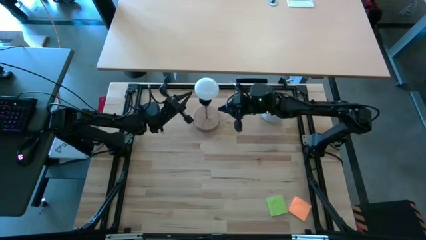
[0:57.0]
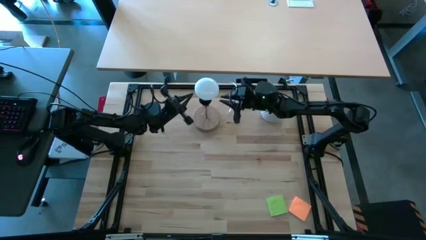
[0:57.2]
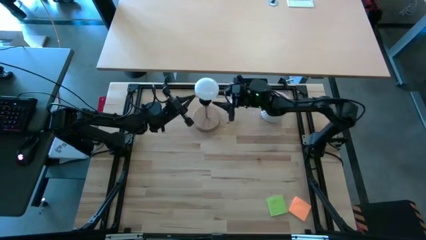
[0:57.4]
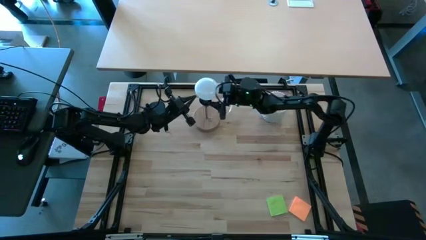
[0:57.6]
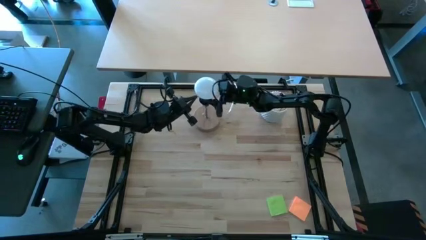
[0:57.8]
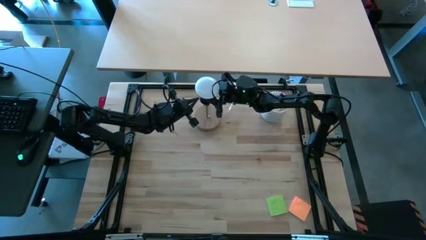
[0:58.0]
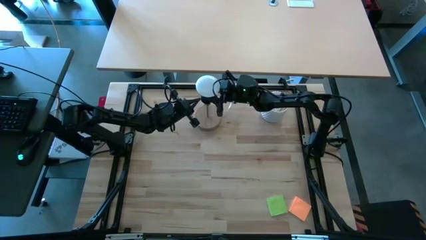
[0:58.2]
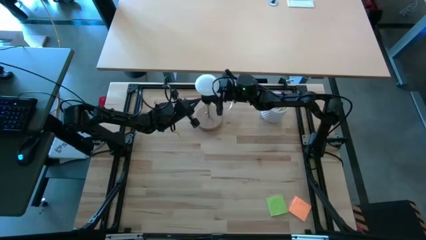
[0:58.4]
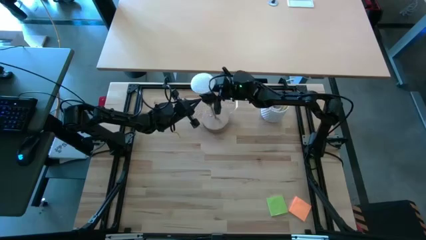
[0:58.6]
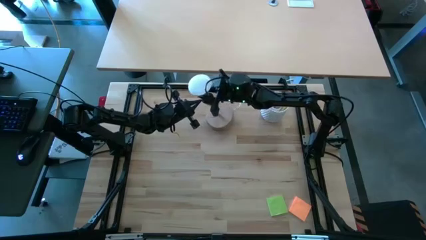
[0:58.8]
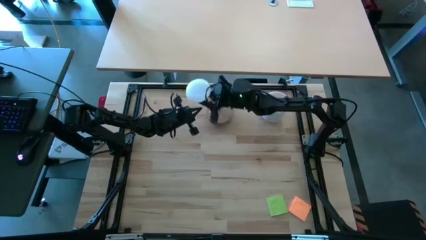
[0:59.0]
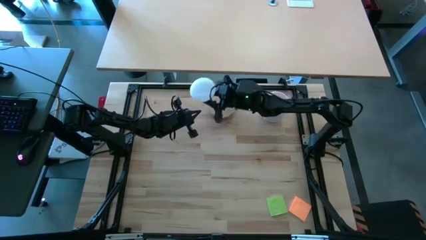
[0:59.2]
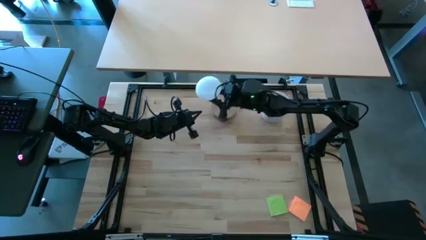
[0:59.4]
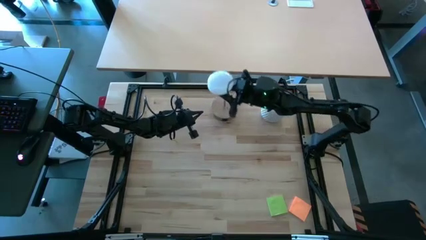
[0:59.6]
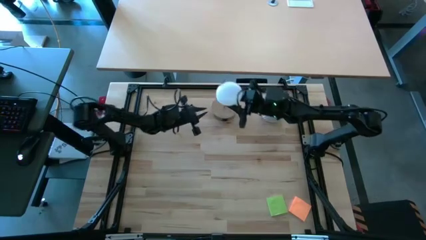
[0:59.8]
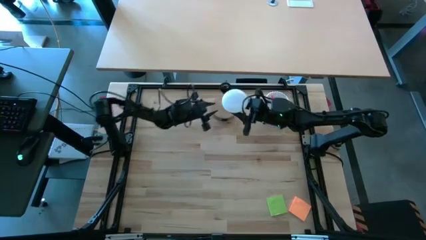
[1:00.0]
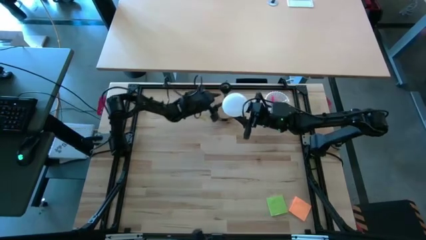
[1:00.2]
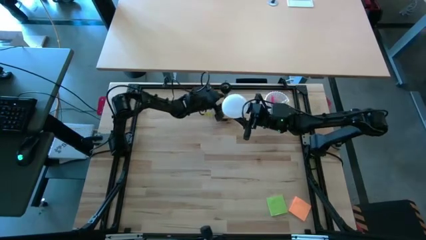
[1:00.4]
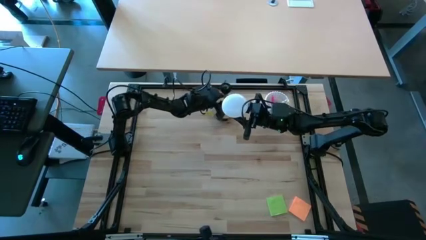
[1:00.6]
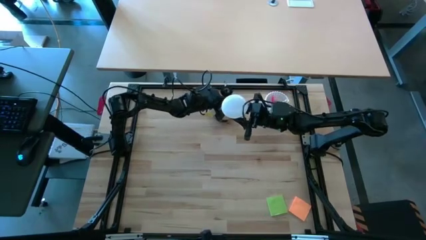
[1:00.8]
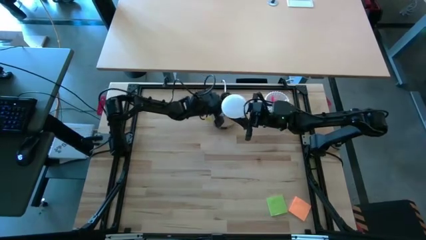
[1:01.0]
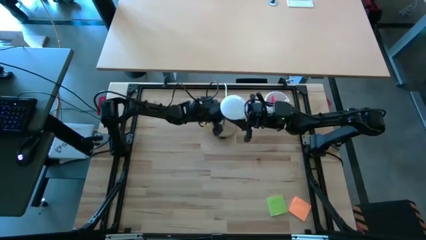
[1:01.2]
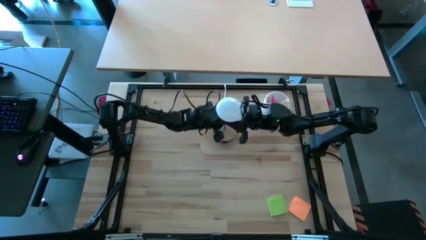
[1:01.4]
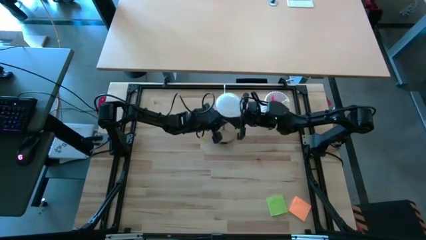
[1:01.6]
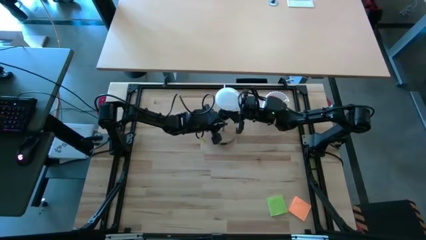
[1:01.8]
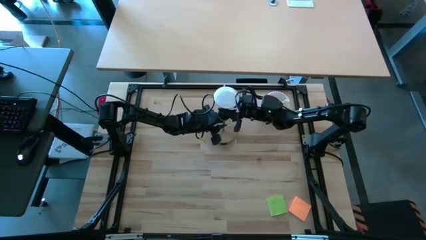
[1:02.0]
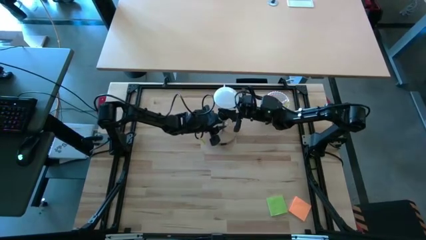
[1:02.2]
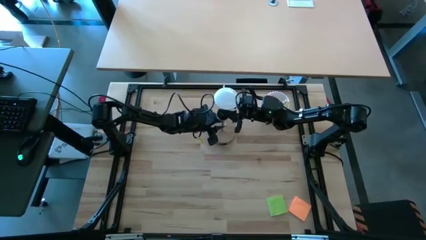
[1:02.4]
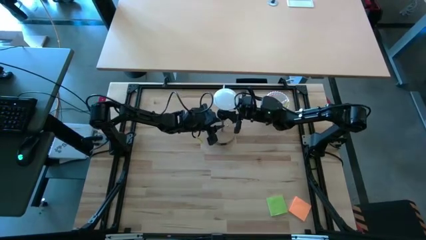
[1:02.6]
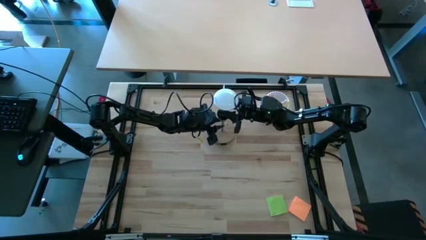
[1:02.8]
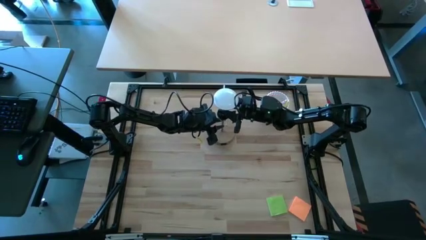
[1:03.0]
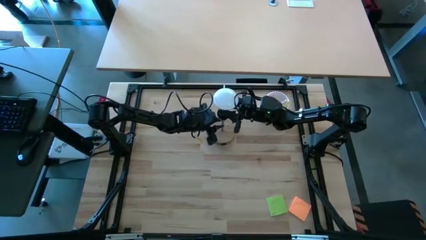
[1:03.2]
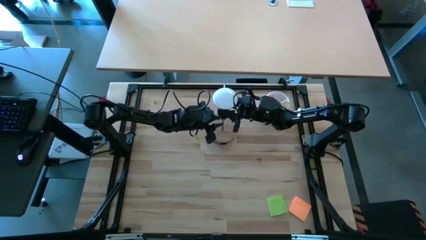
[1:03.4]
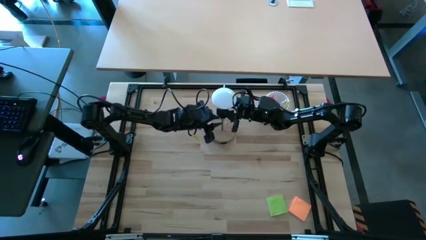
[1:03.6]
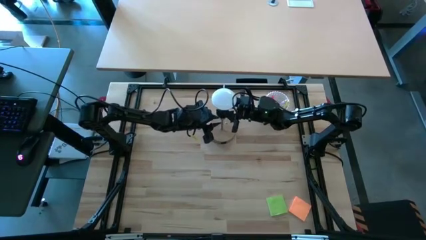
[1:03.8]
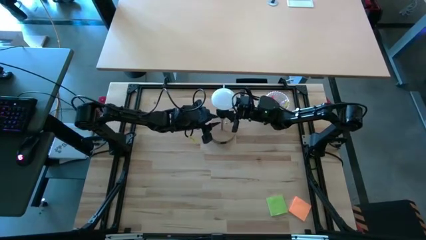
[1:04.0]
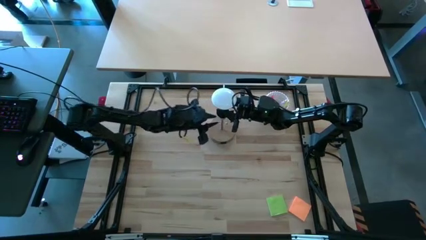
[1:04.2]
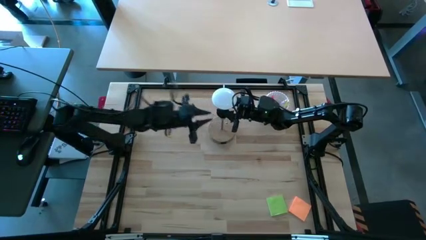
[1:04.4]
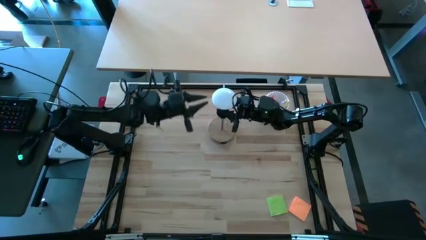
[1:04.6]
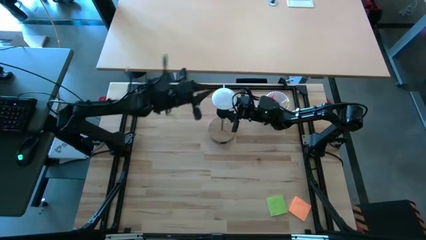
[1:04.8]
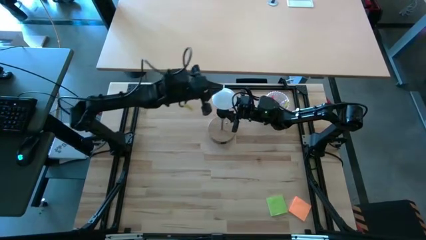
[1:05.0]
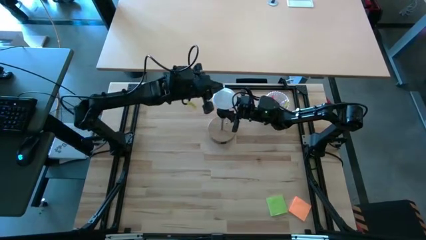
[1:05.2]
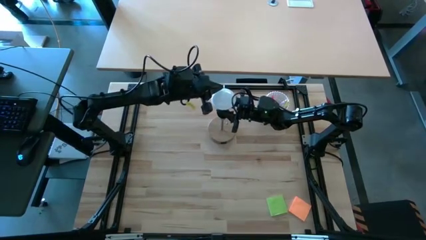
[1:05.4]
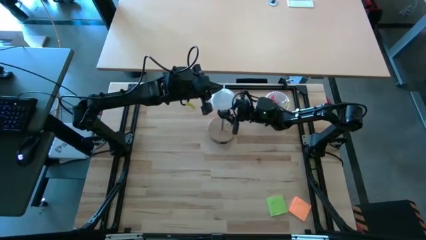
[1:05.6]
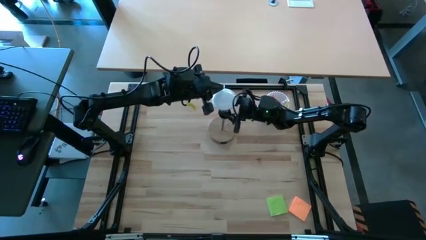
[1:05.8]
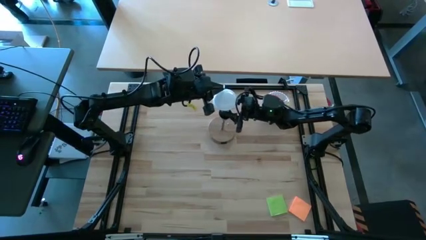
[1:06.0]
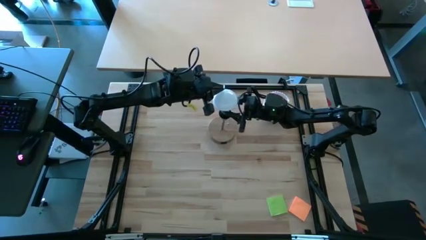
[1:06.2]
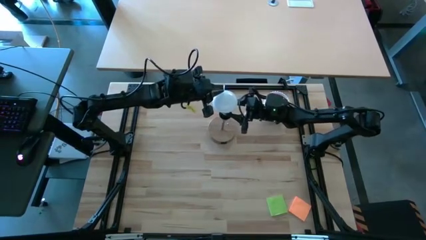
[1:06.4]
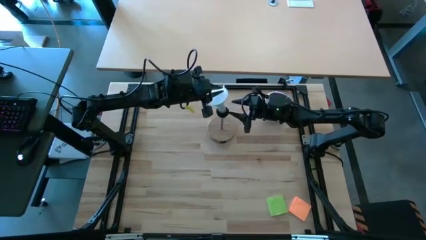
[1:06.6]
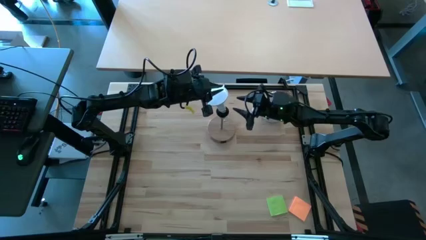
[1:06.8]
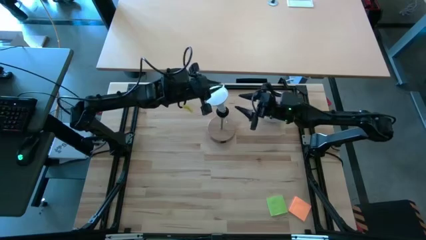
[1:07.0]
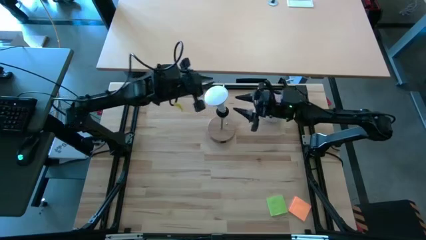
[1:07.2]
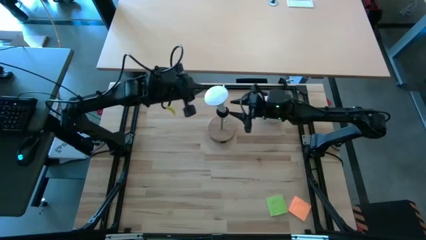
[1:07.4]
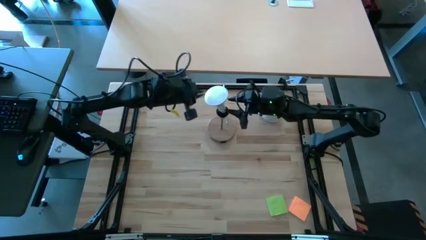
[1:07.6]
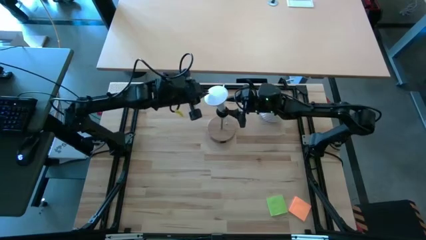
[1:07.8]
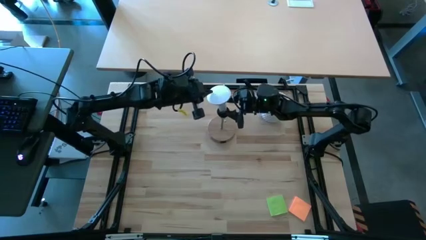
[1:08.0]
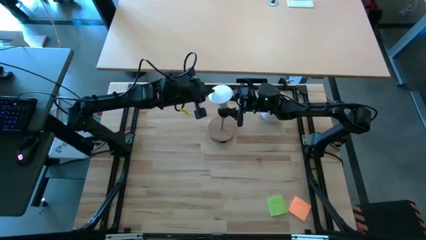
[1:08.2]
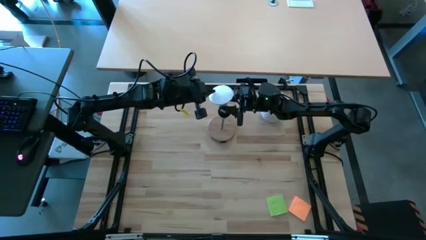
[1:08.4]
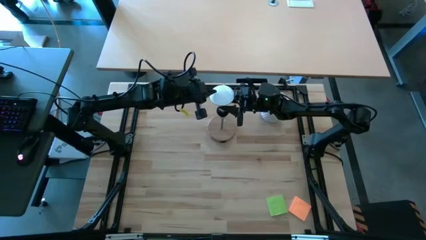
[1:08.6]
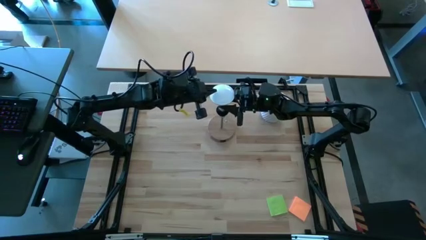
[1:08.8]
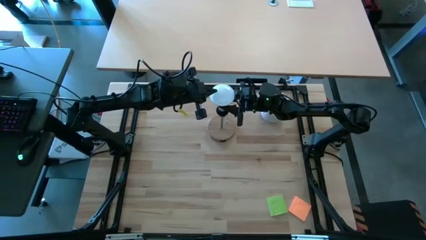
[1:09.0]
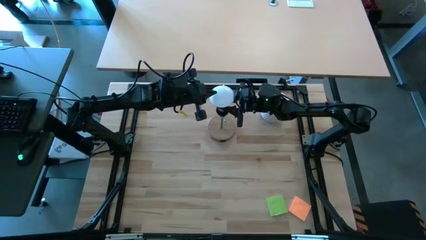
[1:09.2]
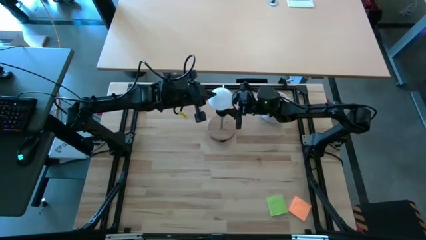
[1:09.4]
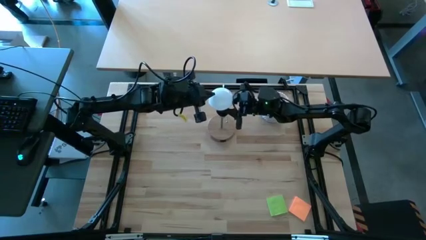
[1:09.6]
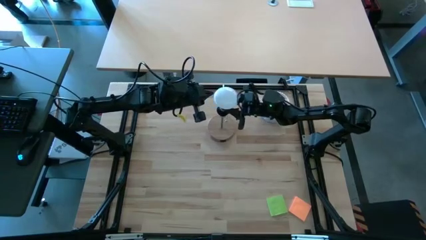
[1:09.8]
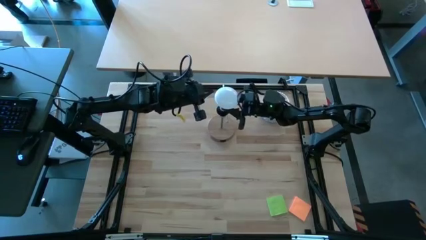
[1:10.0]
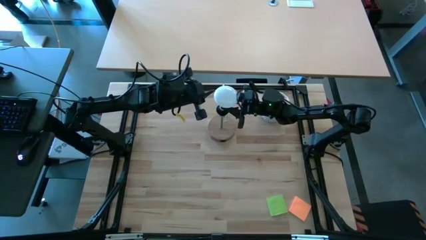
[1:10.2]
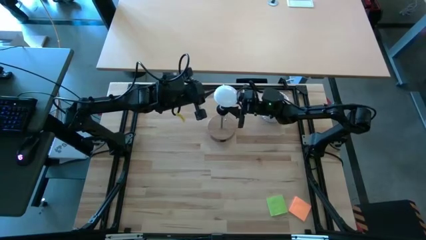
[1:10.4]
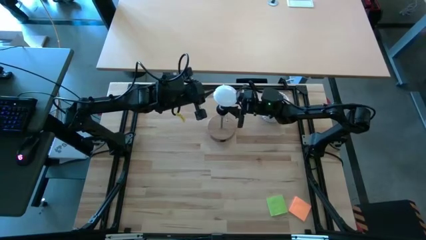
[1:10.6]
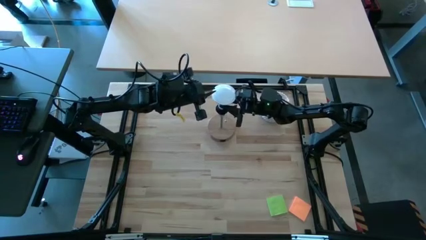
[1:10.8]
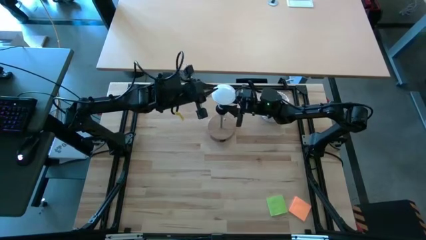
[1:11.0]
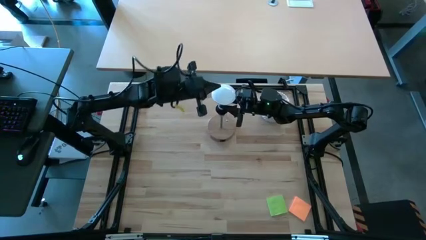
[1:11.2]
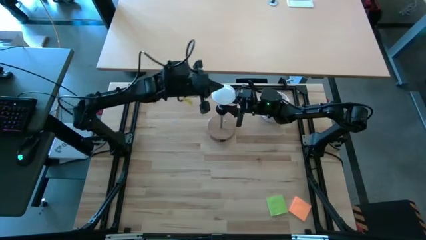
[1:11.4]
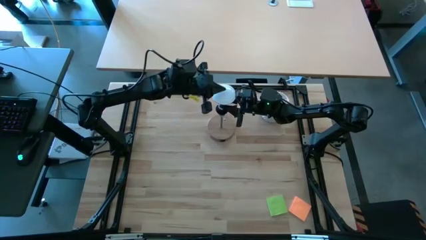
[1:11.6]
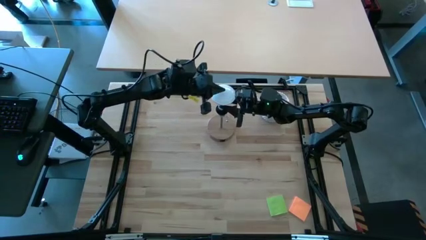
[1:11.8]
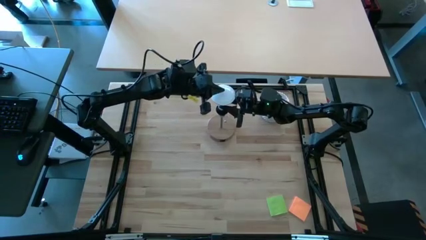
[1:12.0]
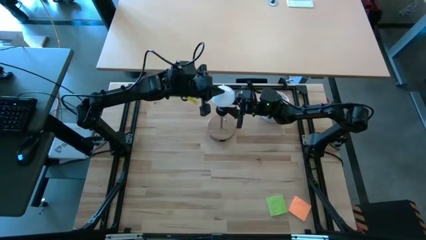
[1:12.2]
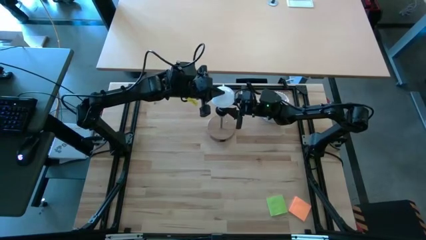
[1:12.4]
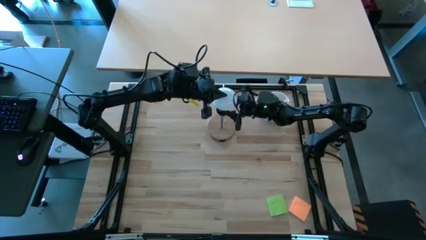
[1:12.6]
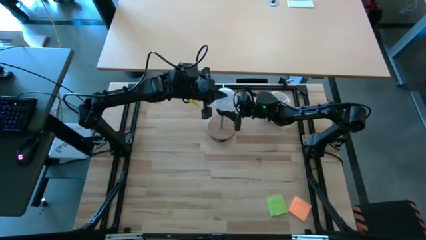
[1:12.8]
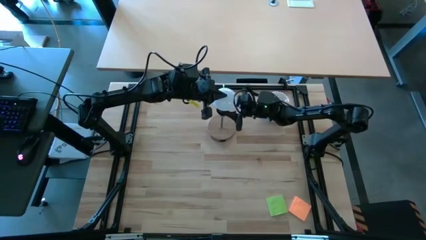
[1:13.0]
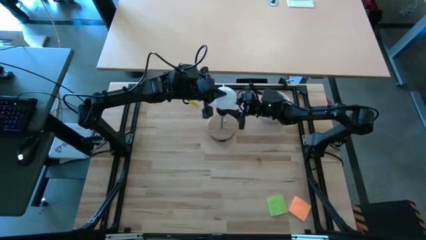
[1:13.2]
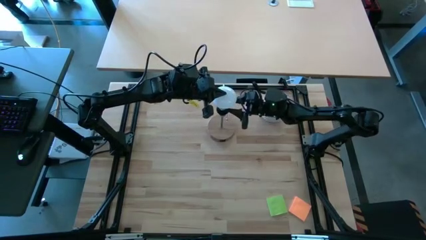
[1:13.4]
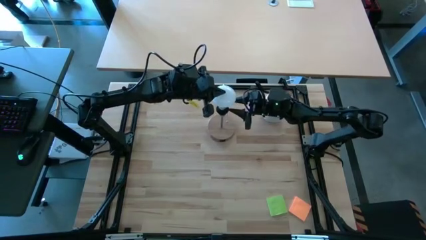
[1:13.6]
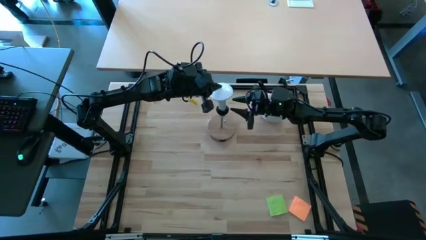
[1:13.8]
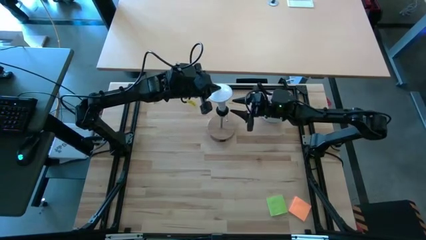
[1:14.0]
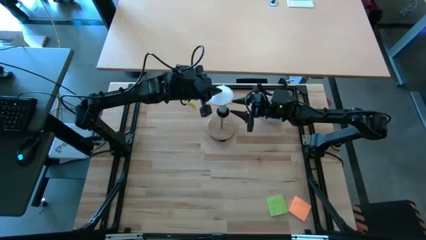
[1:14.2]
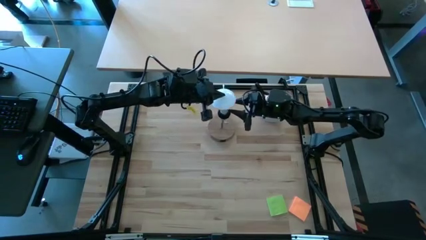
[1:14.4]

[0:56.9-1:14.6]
Task: Screw lightbulb
Insert the lightbulb into the lamp
